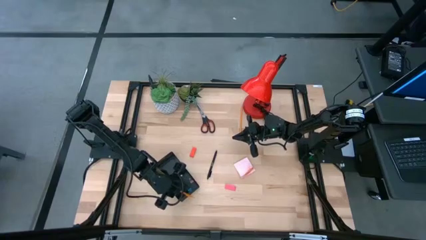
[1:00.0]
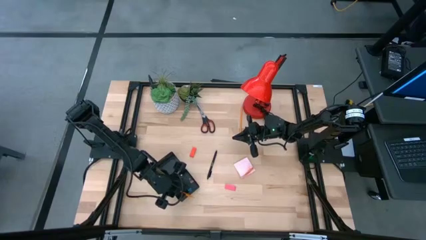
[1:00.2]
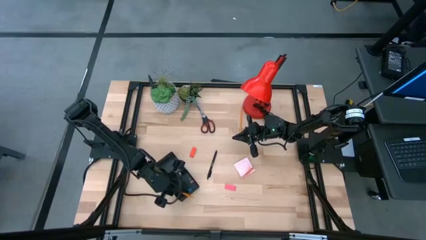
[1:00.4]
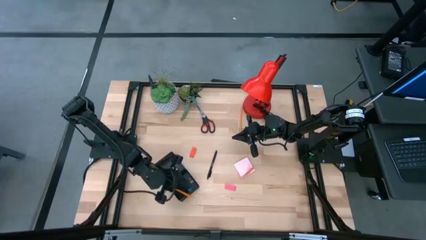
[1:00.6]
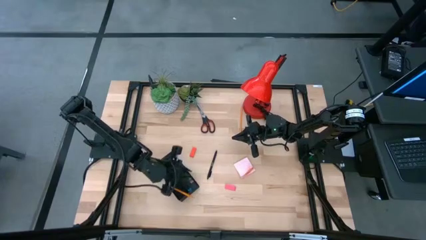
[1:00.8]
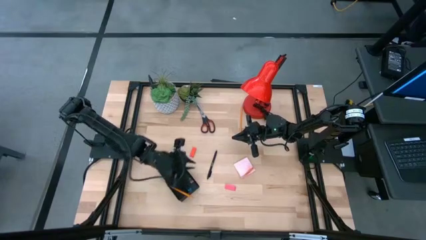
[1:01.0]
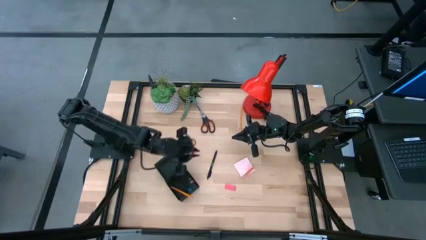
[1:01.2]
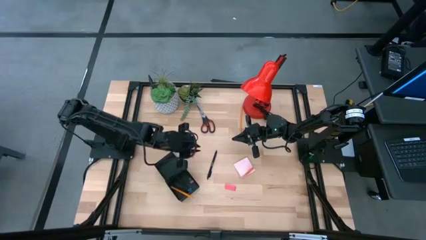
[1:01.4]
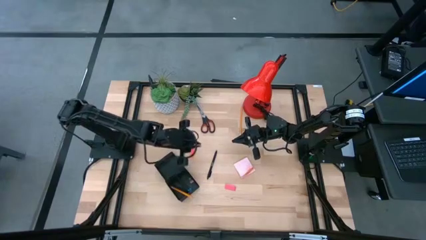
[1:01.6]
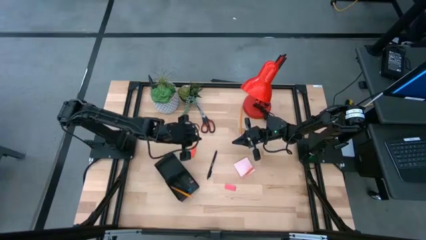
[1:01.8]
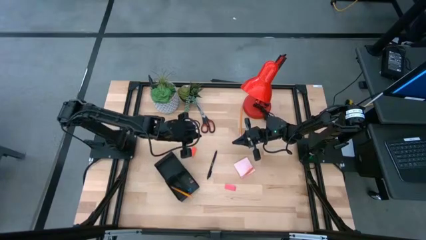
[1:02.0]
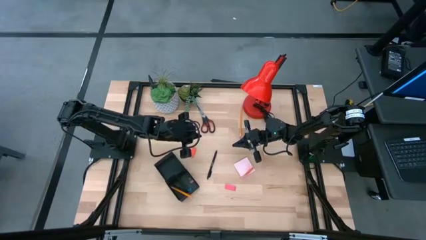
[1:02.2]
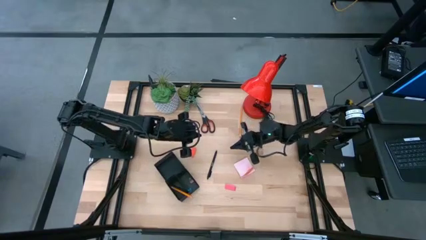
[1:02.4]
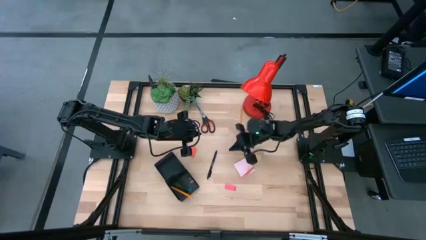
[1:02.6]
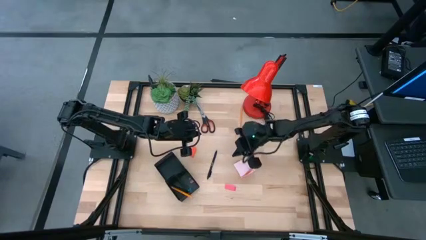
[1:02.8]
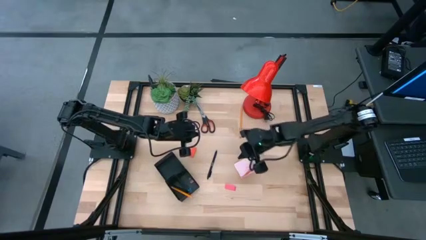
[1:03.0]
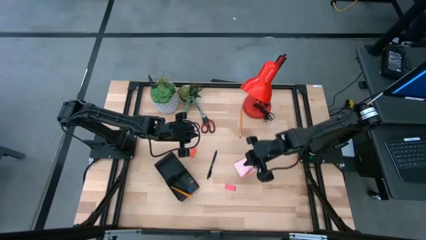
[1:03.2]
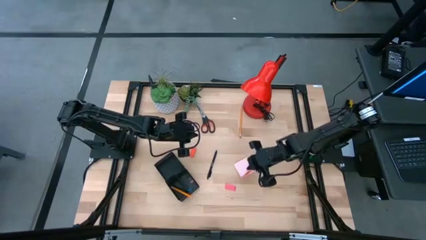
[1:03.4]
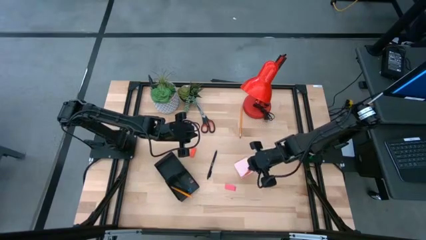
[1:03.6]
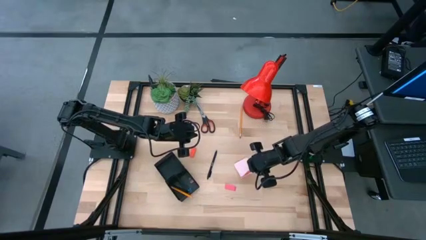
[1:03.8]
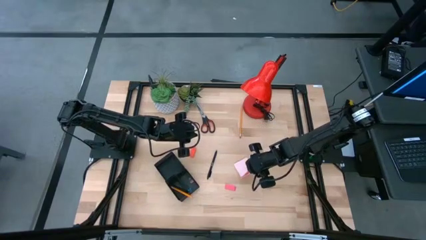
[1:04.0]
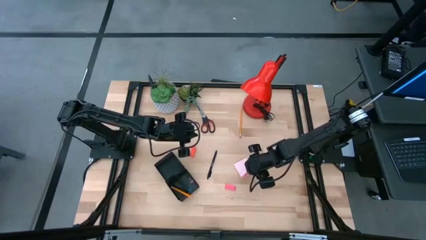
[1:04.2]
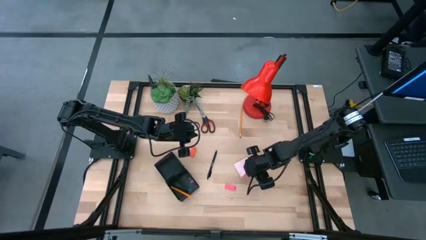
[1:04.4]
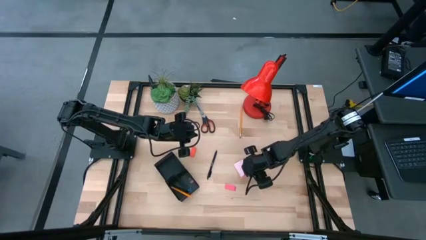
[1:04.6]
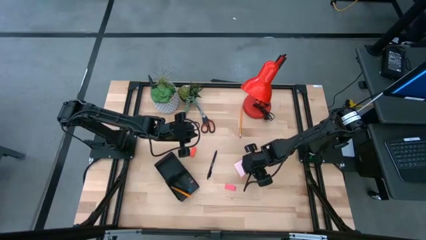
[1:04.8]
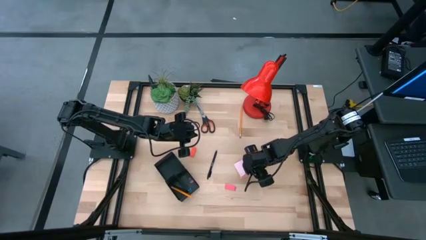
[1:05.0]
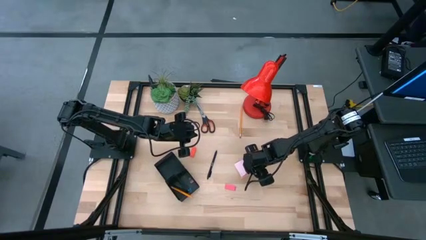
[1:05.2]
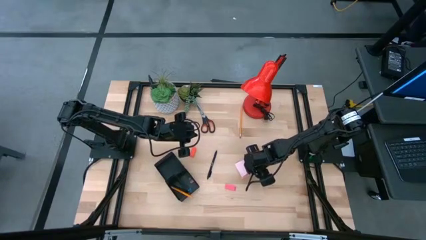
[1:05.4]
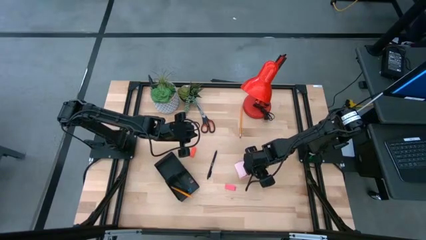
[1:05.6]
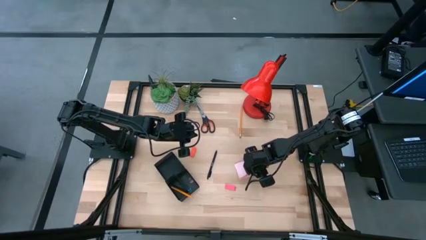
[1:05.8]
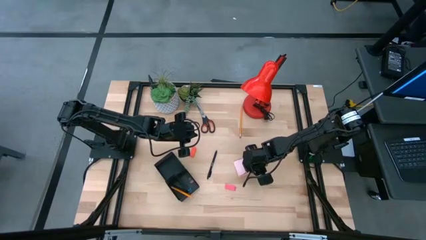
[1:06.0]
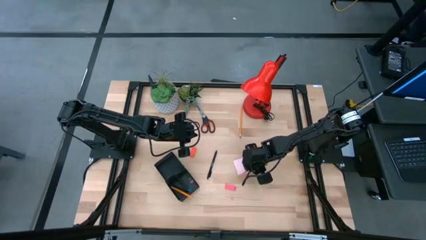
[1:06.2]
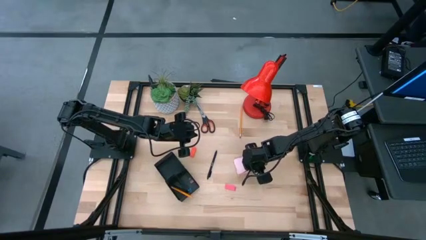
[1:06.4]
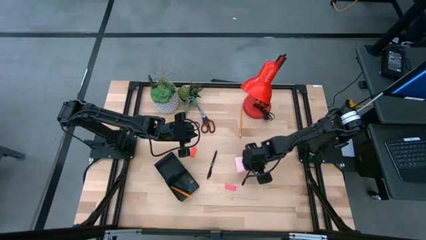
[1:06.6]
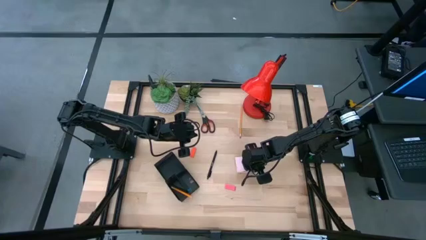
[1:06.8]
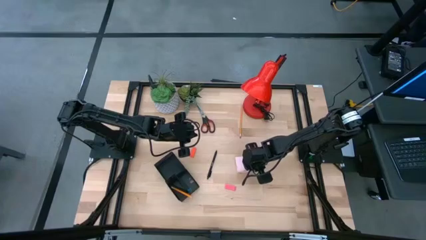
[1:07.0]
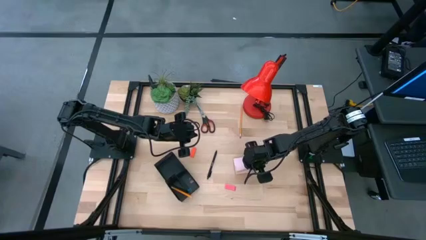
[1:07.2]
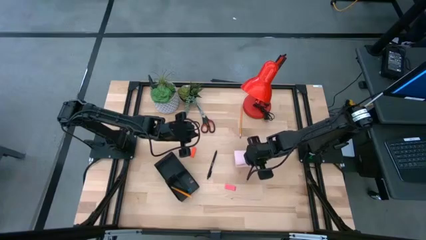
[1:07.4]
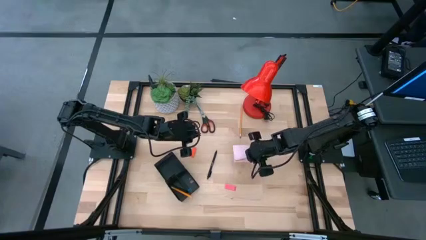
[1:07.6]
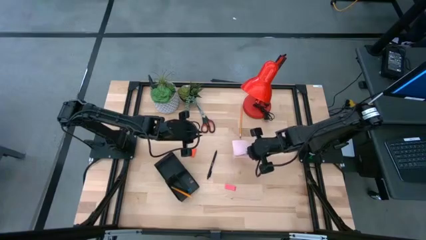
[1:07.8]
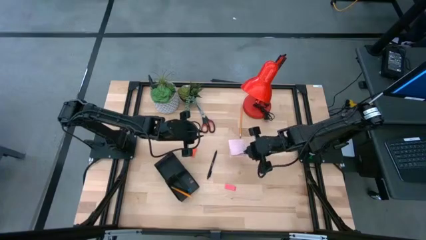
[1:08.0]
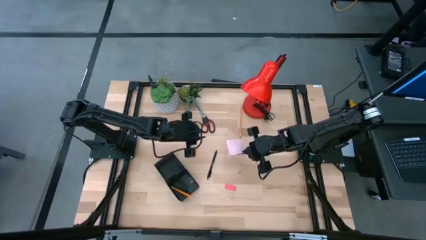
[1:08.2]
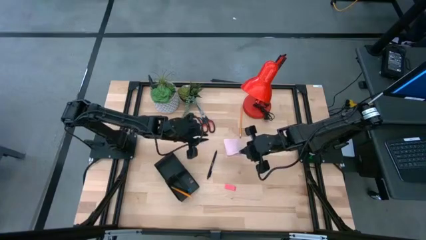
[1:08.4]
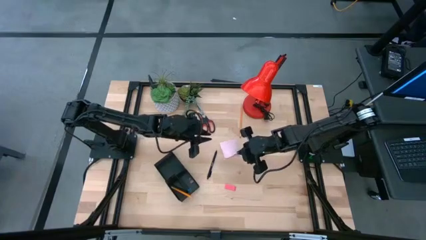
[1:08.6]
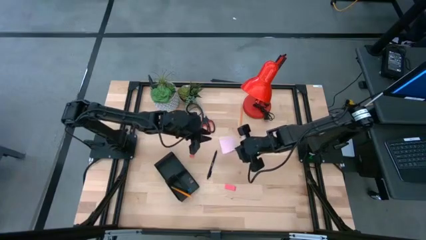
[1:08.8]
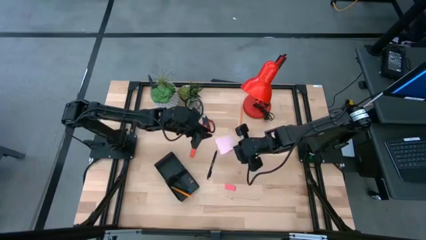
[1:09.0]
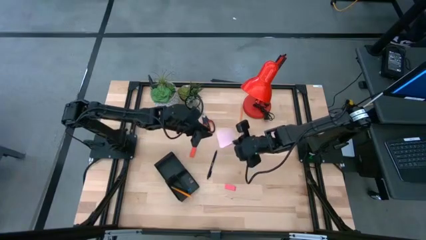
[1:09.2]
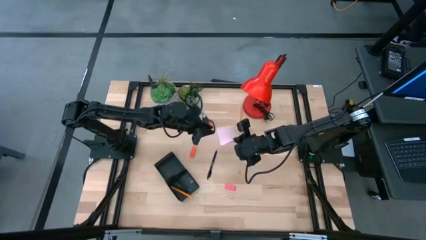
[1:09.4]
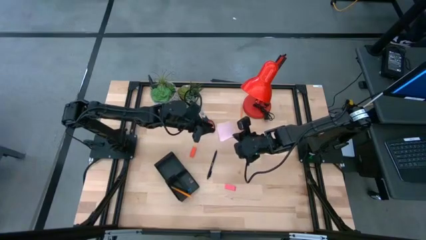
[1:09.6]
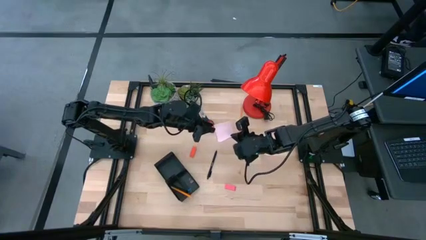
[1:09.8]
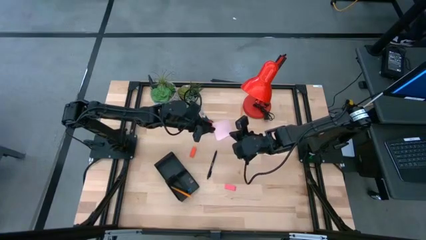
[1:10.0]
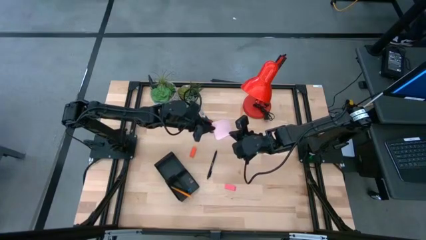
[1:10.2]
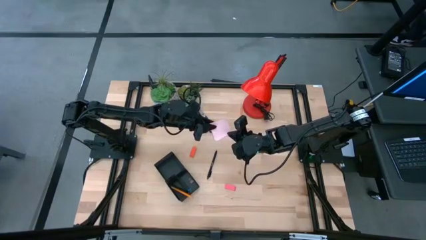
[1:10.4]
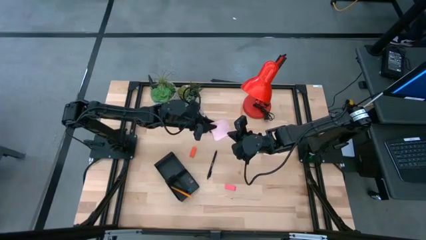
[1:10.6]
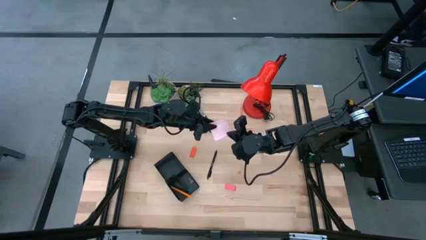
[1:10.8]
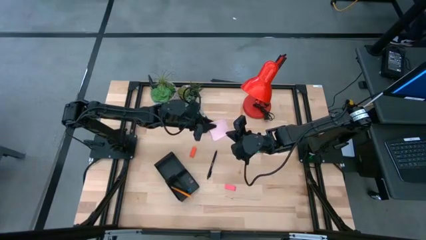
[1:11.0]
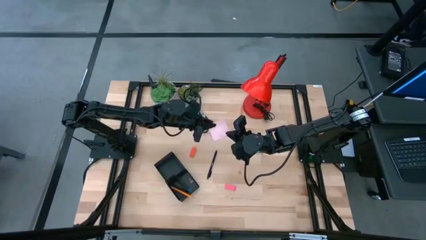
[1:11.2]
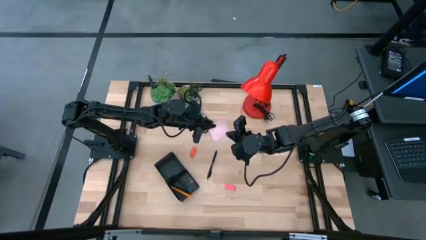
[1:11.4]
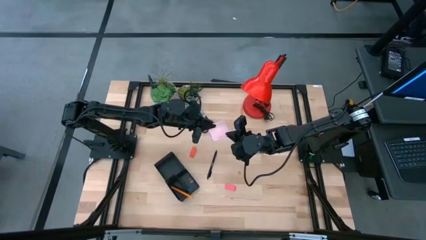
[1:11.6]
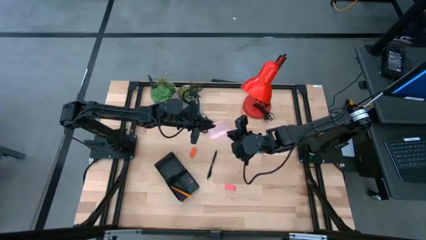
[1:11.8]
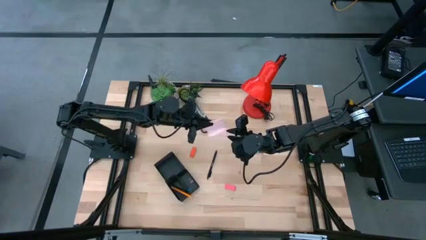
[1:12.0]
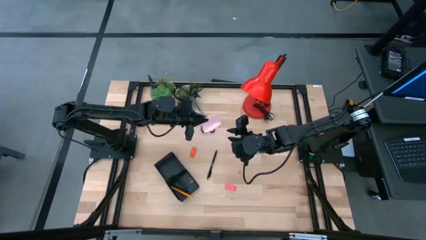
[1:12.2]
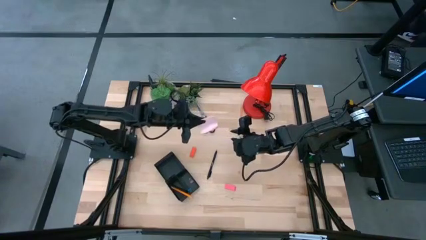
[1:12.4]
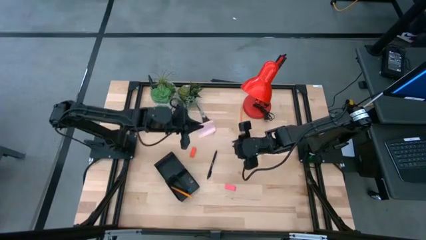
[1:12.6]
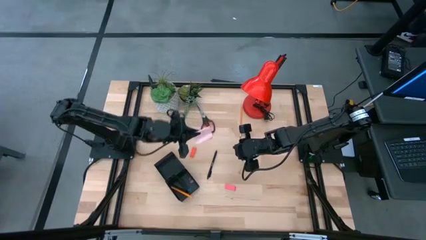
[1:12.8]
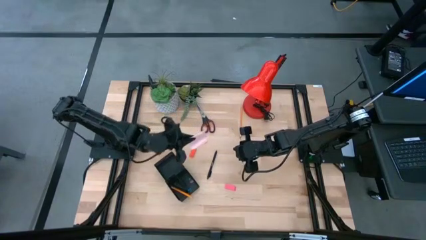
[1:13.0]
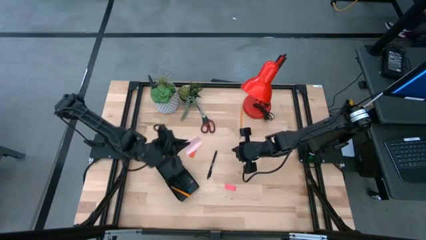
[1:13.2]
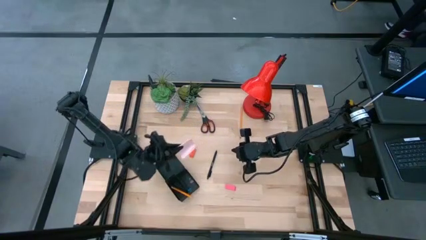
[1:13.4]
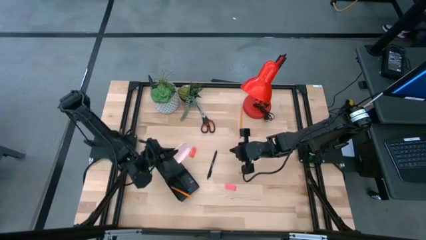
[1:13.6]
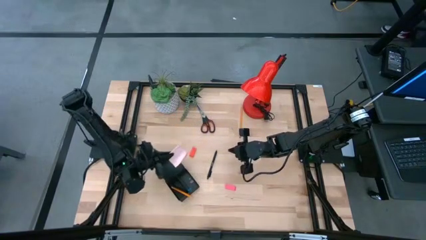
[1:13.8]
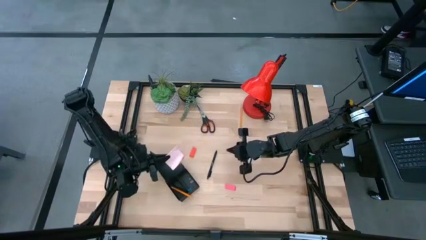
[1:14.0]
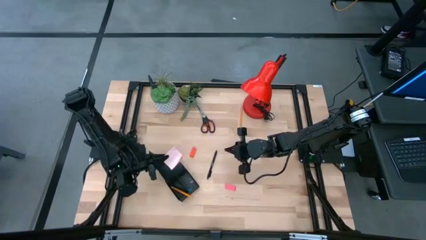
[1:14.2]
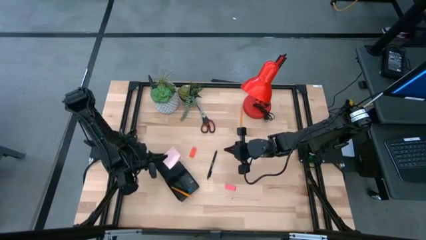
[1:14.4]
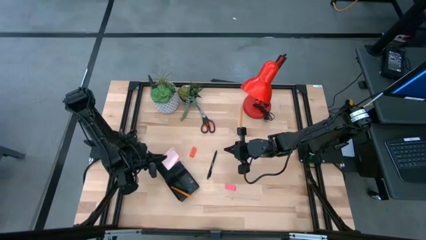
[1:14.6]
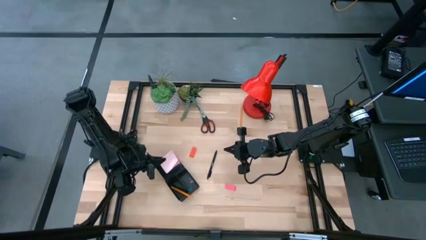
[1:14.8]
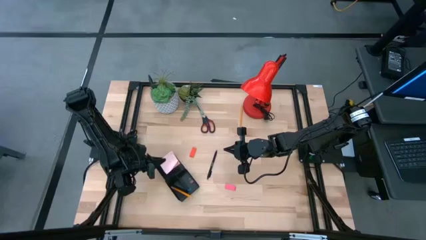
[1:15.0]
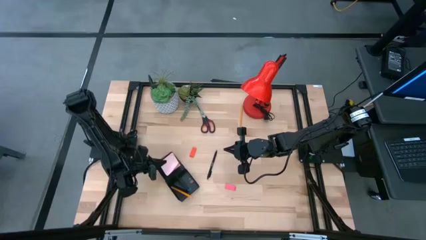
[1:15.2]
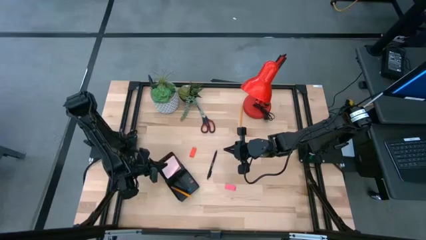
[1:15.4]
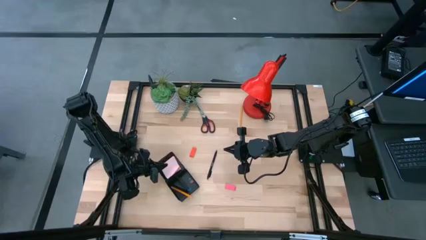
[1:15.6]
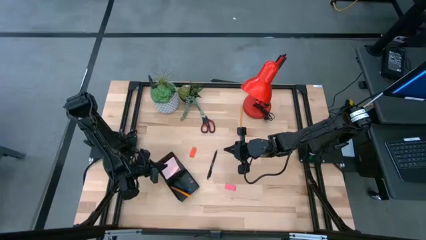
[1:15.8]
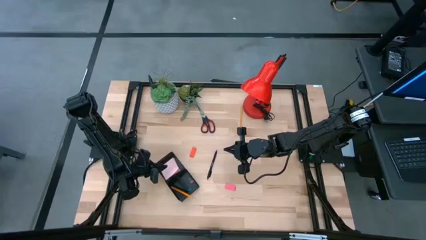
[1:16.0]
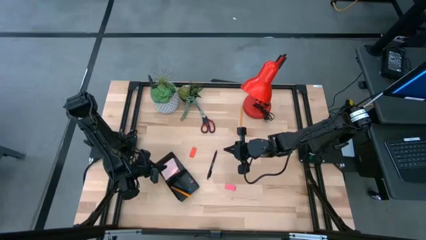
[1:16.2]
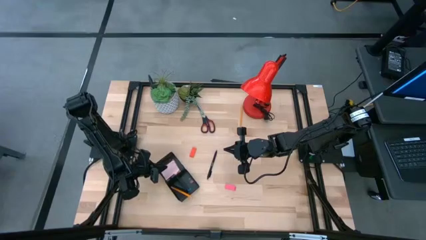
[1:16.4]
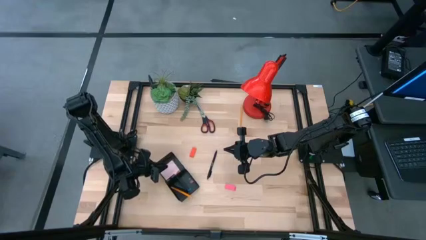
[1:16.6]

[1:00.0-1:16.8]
Task: Pick and place office supplies into organizer
Put the pink sticky notes into the black desk organizer
